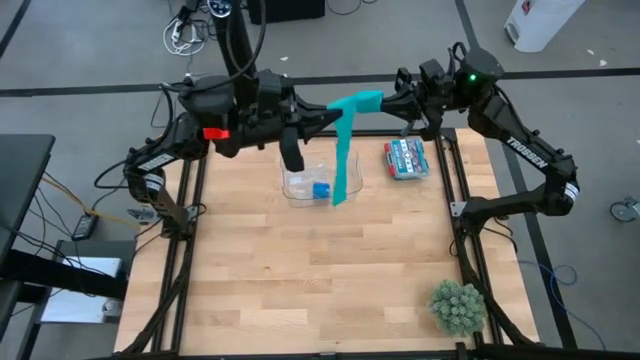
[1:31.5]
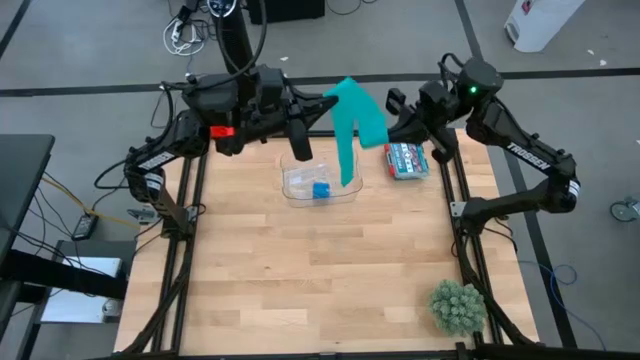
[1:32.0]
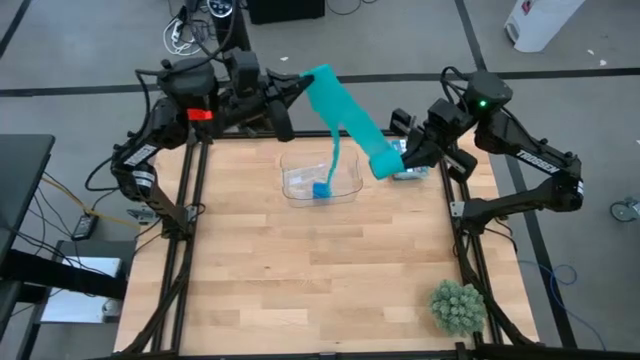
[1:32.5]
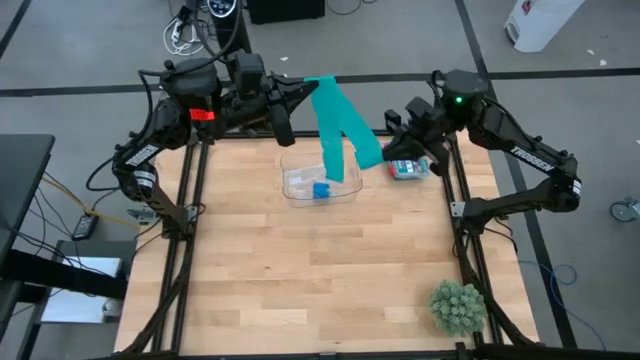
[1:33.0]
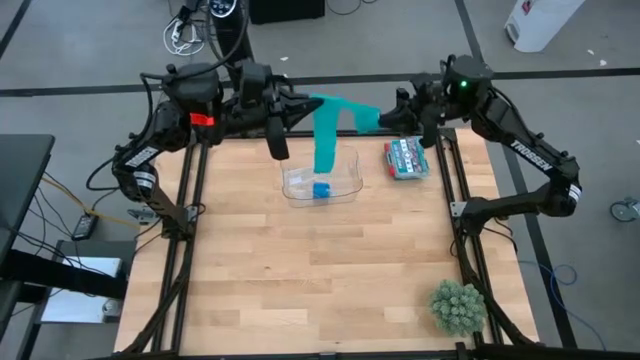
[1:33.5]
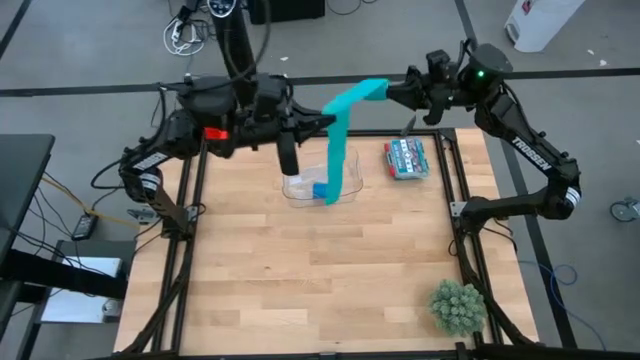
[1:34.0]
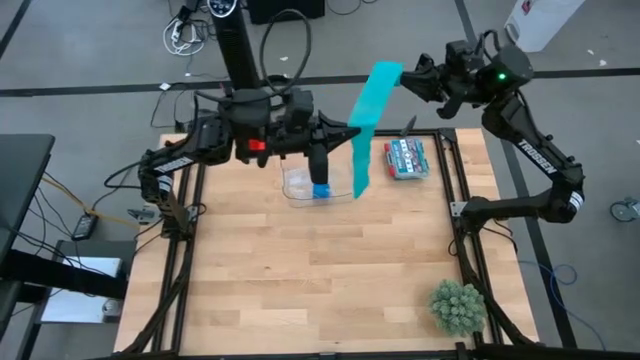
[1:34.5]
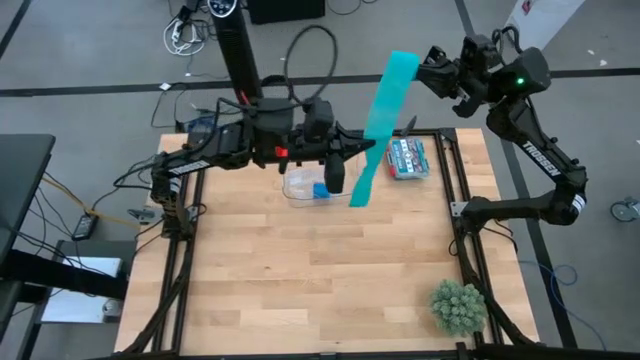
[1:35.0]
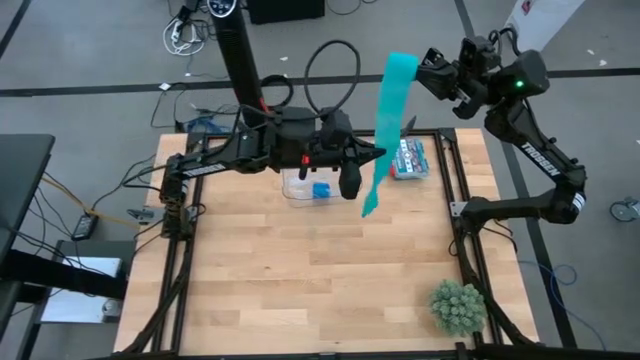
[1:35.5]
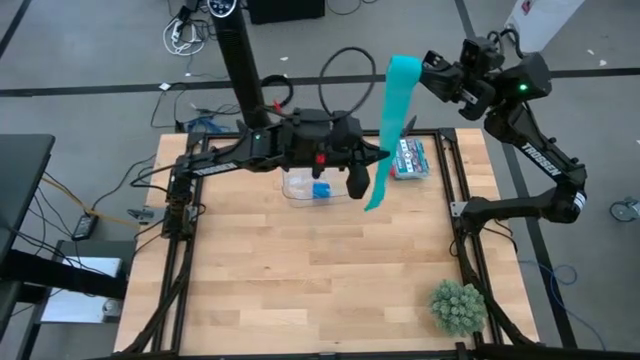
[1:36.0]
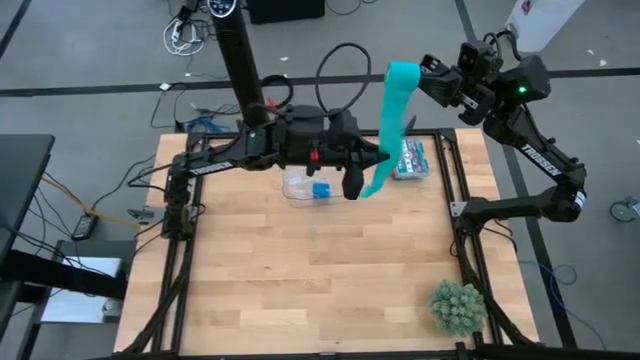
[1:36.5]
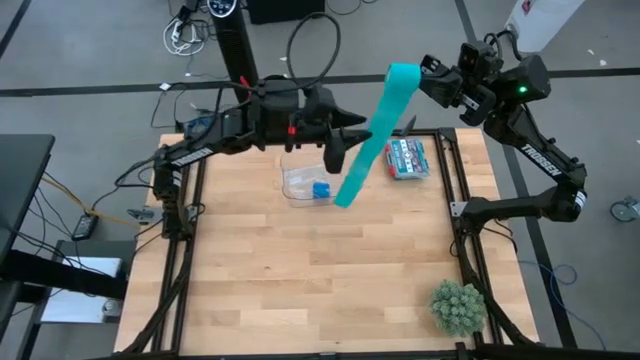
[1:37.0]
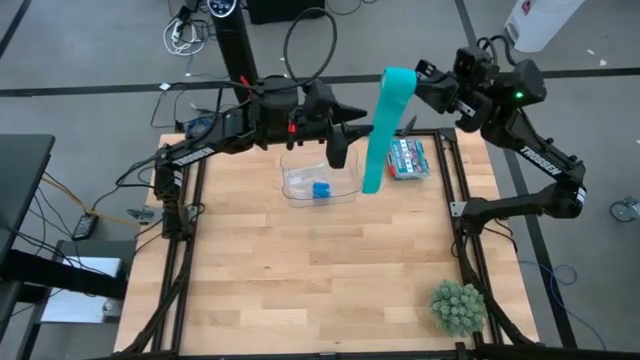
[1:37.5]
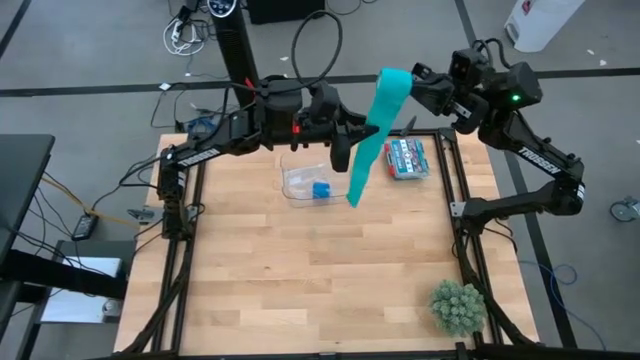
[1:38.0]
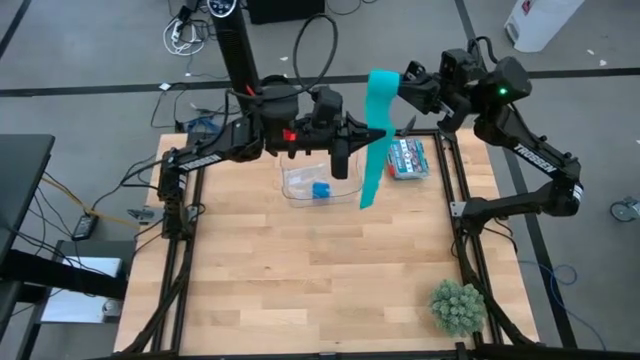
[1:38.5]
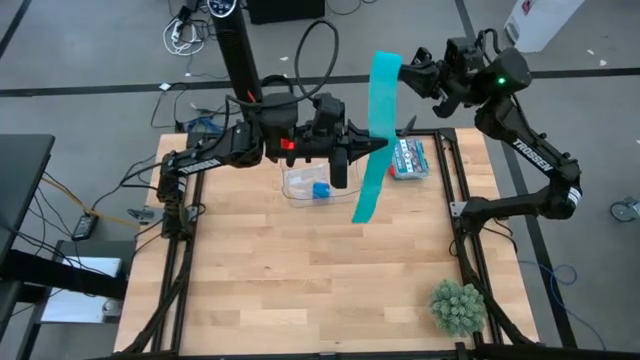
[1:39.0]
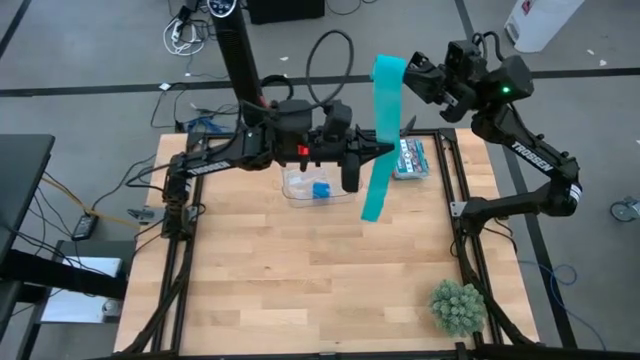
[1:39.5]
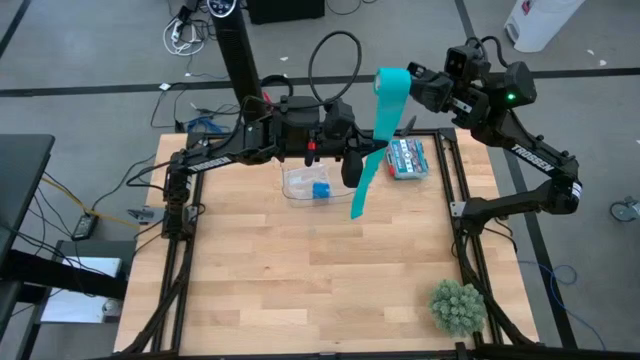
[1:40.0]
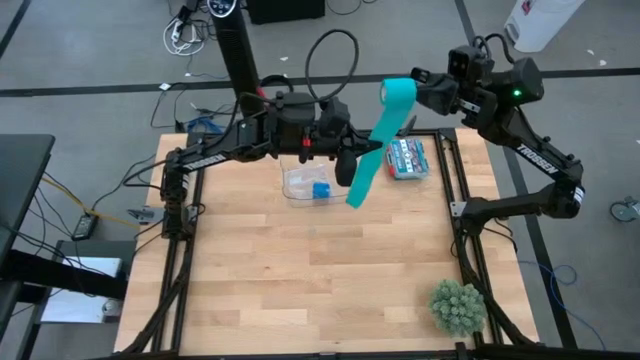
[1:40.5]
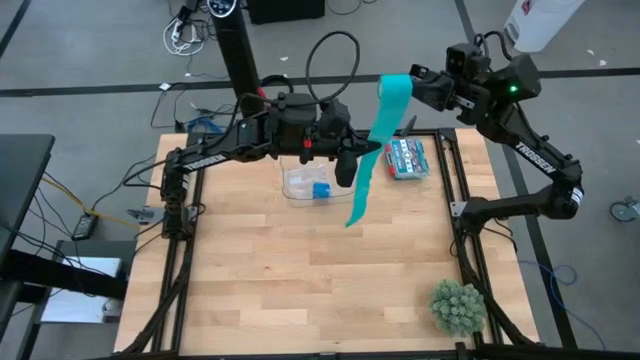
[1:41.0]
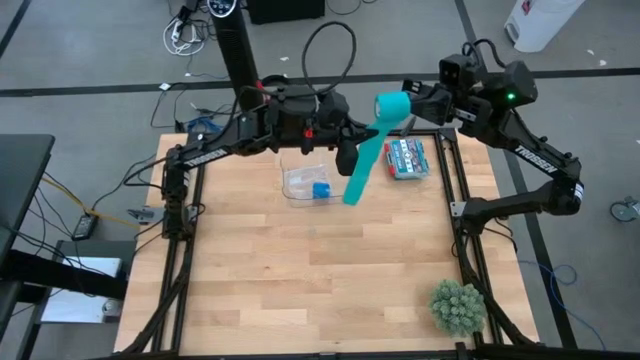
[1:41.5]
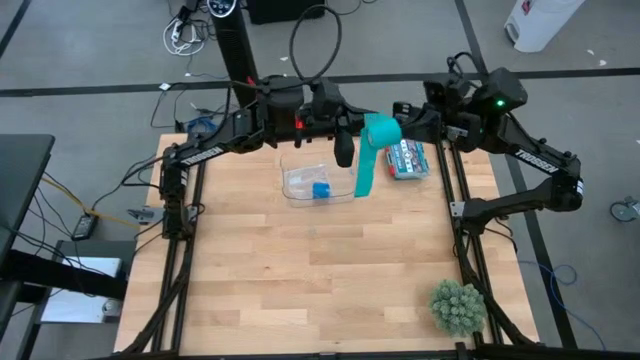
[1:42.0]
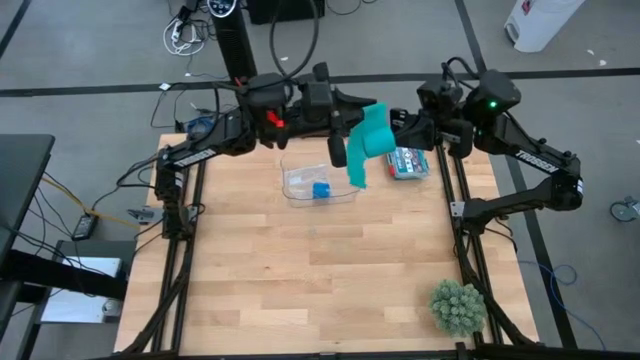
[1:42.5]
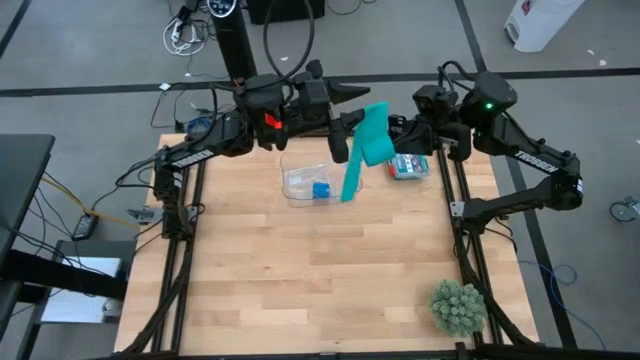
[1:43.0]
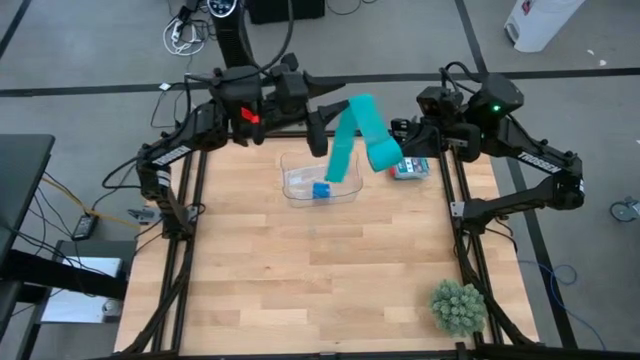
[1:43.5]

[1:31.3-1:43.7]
Task: Roll bandage
Roll the sky blue bandage

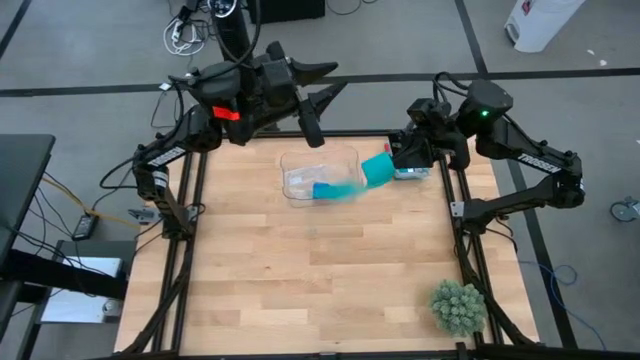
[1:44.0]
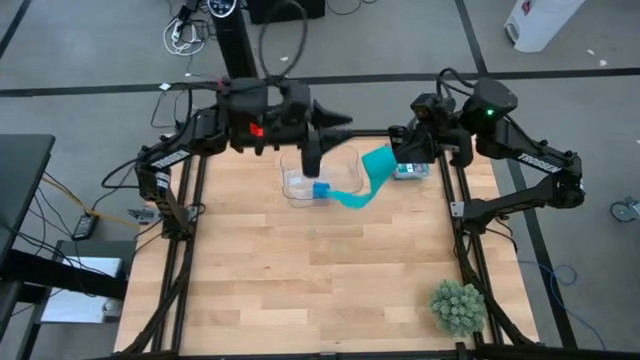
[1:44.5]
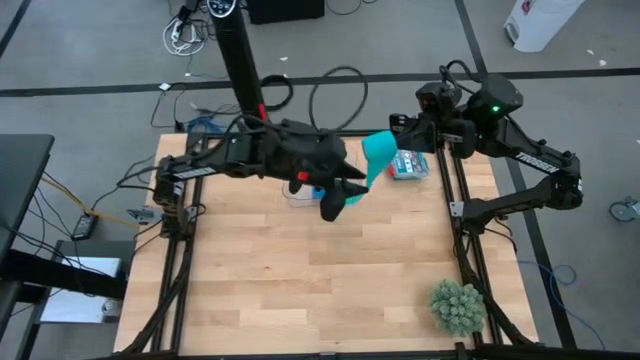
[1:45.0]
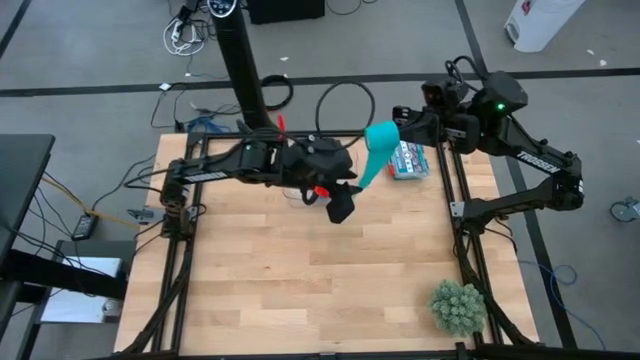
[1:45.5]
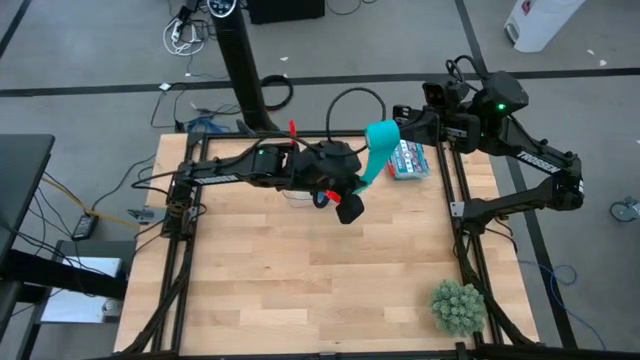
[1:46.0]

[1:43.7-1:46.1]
Roll the sky blue bandage

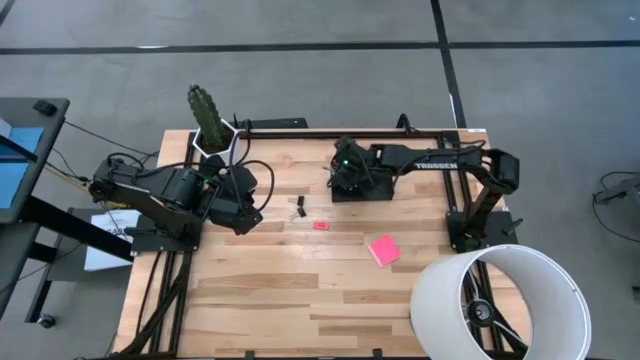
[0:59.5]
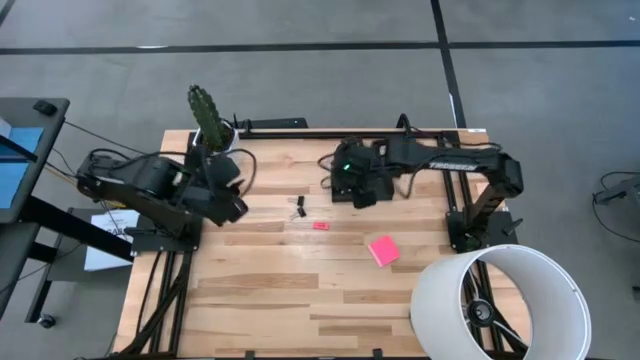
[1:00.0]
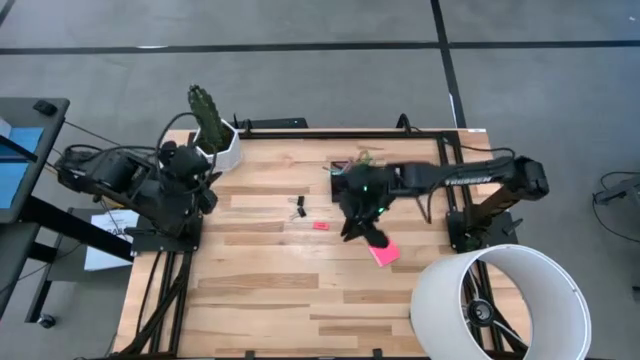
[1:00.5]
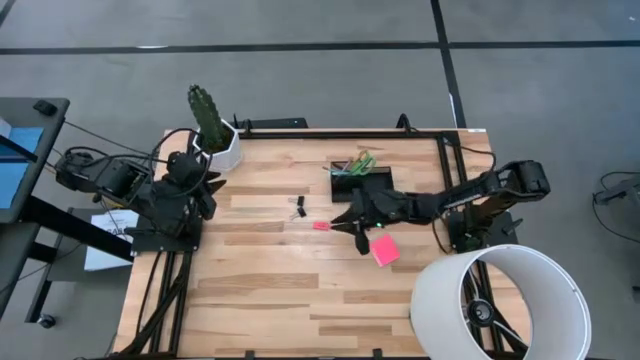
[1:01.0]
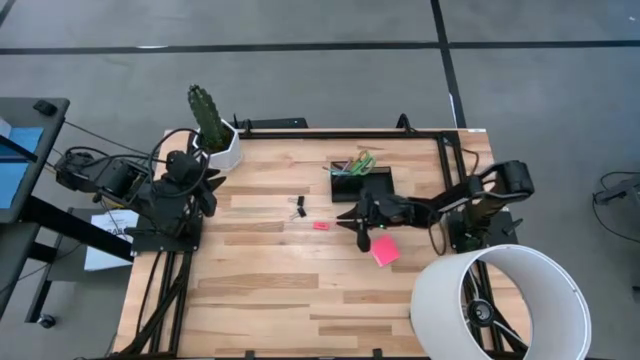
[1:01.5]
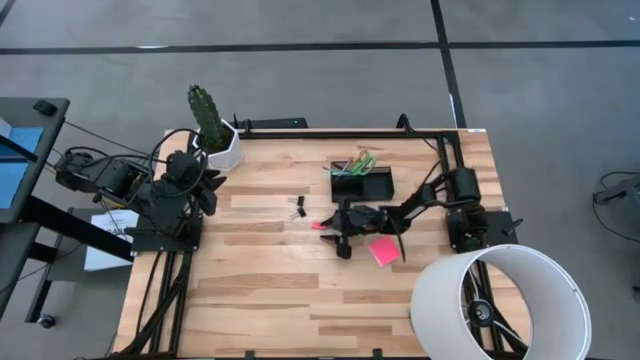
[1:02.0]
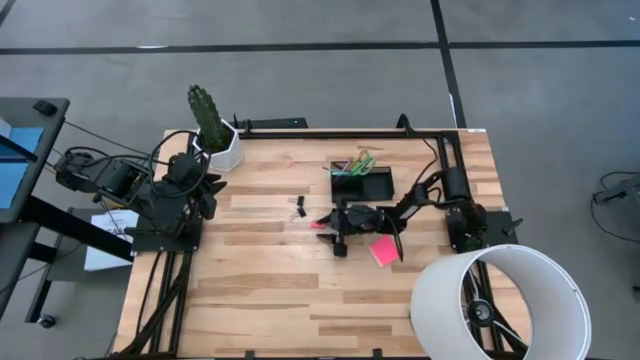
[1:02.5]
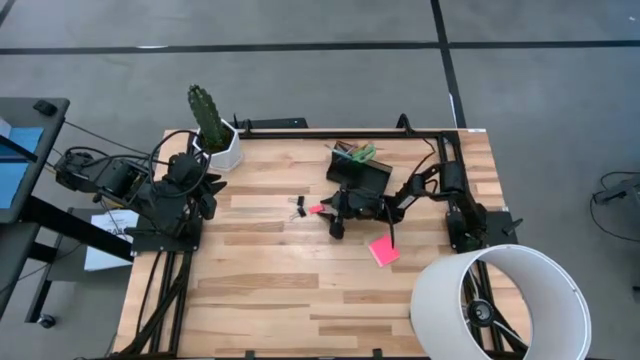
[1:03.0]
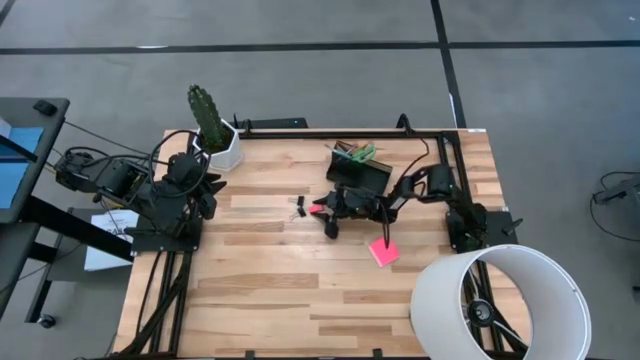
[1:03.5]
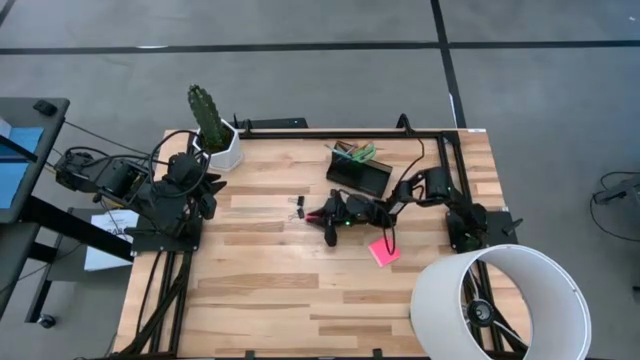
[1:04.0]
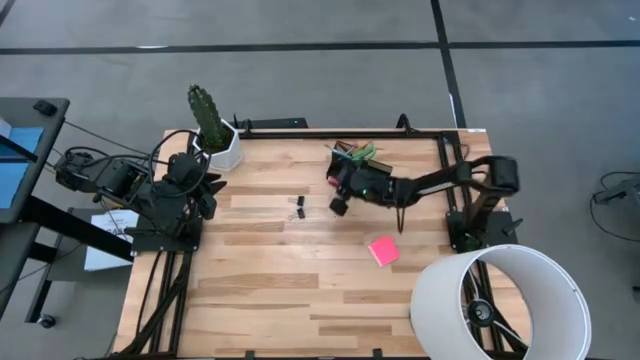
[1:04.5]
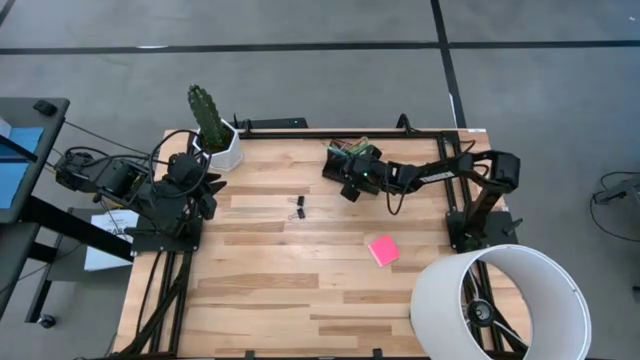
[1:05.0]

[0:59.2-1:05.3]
Task: Pick and place office supplies into organizer
Put the pink eraser into the black desk organizer
